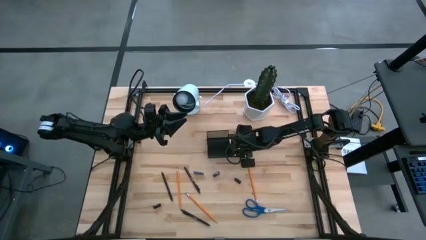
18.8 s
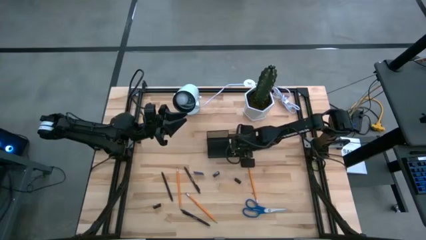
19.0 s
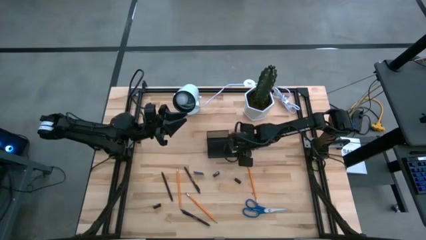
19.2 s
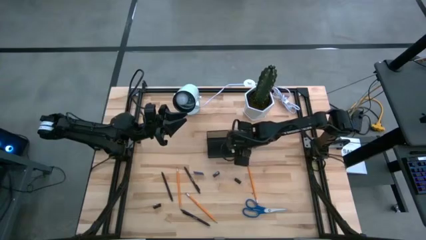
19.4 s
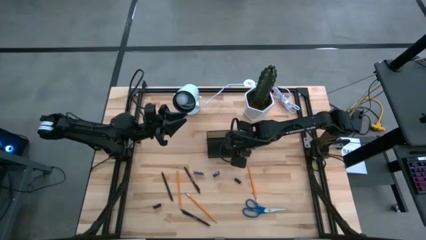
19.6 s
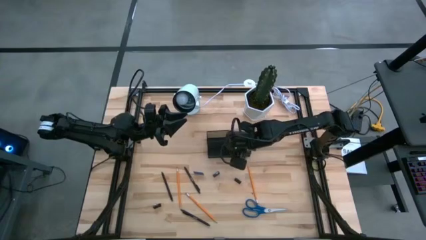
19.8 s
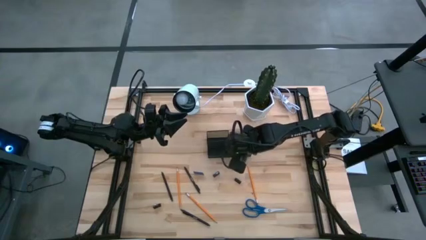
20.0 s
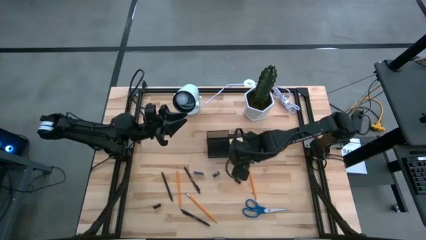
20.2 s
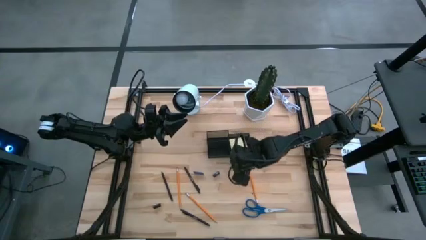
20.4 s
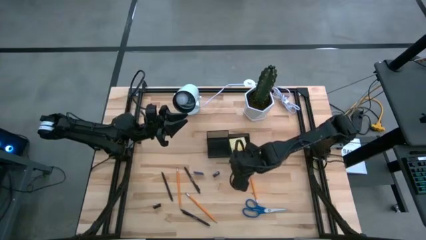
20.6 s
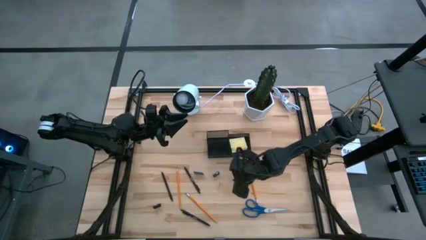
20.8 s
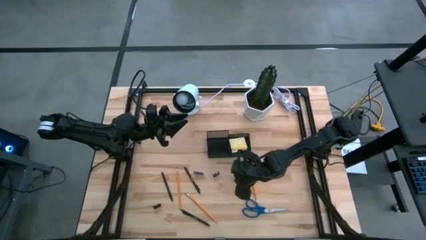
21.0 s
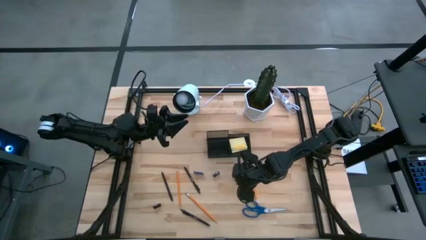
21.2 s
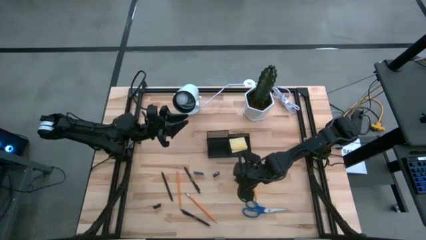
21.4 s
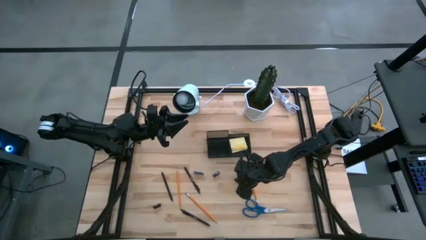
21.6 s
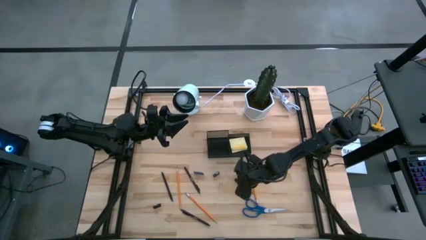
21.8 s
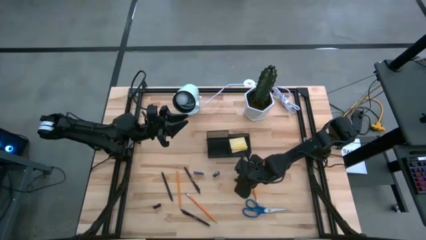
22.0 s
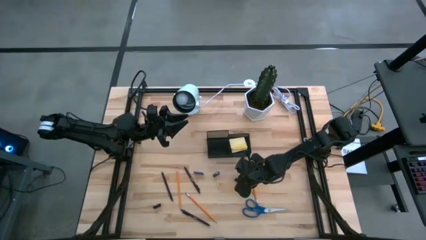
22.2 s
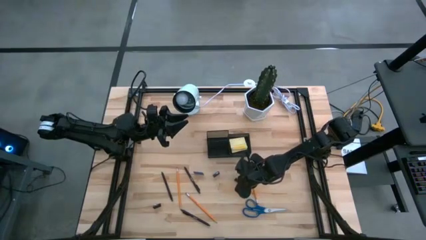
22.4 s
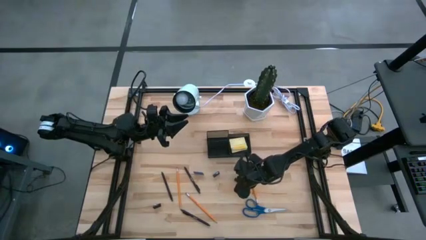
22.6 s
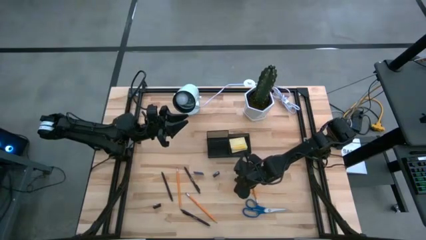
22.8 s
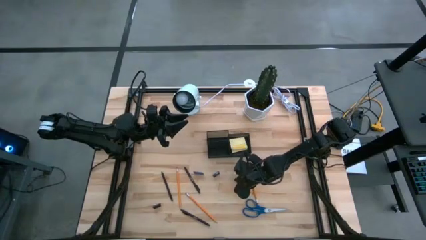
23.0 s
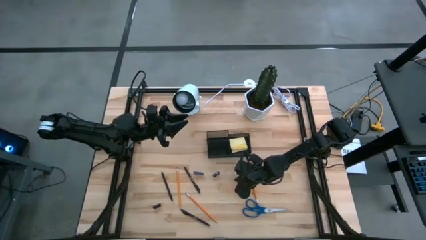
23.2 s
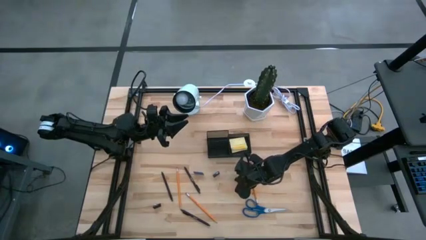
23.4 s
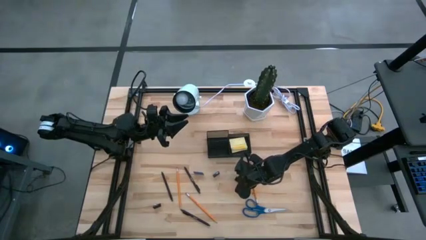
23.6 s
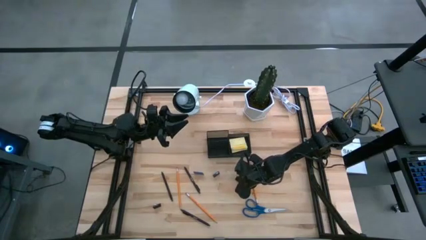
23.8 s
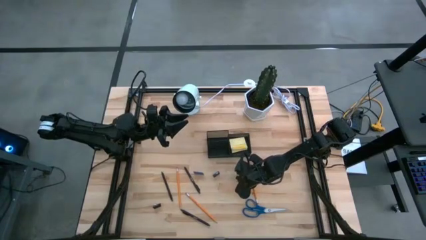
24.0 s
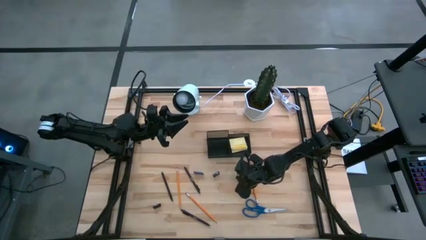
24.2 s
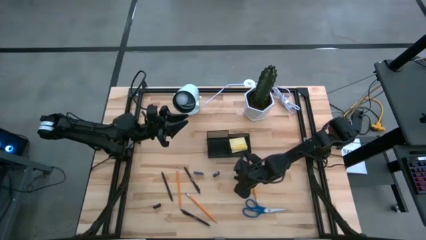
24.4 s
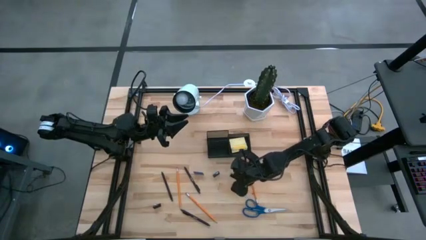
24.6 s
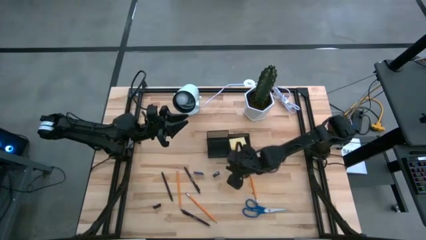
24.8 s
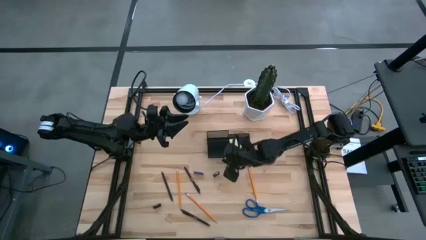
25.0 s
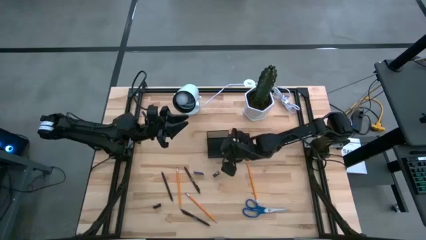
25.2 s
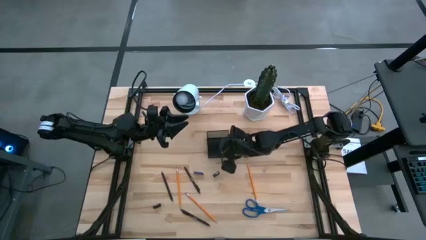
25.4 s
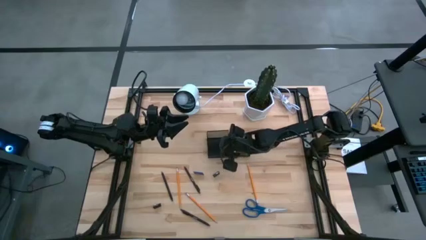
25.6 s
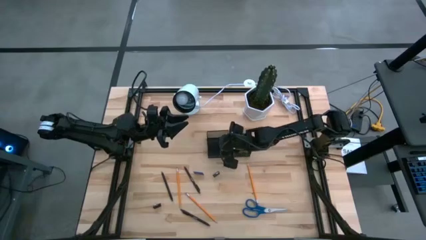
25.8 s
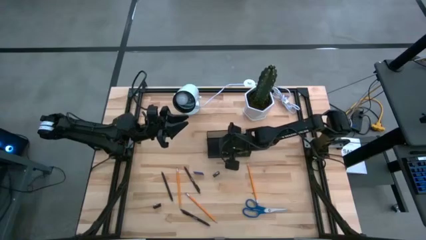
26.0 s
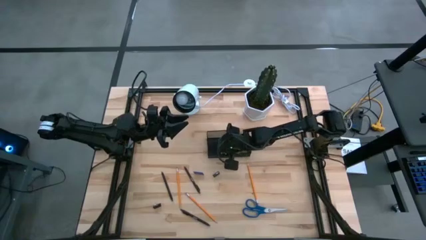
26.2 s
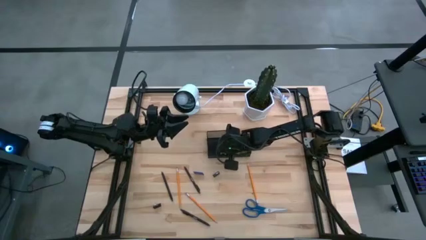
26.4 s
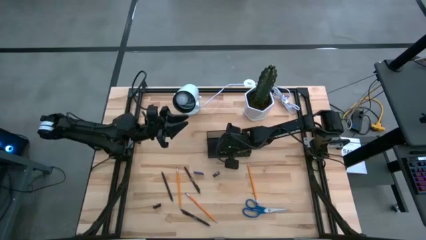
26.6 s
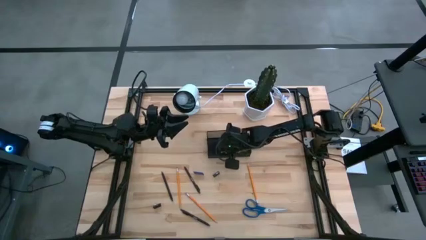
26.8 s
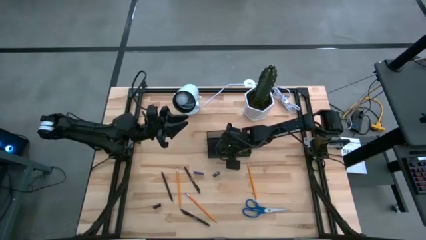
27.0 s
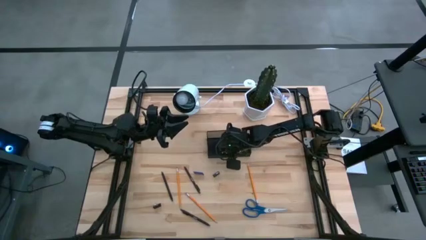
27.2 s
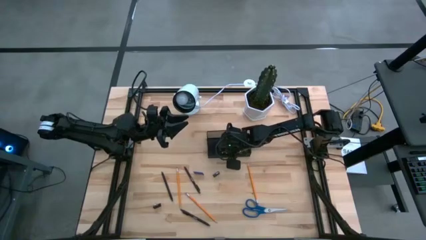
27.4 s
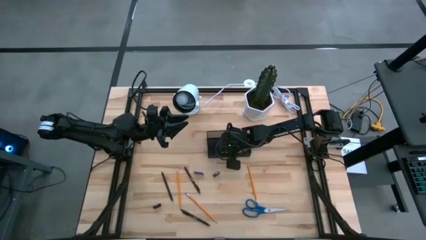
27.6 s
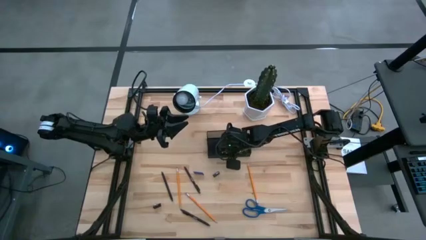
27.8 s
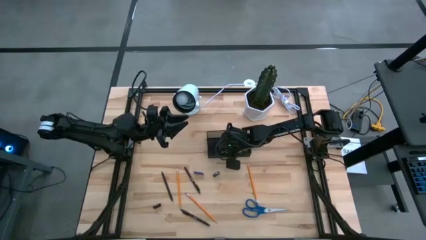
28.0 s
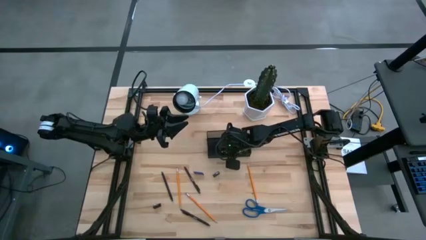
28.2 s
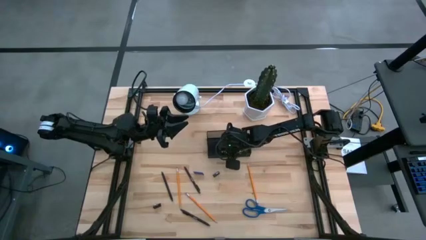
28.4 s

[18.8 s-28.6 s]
Task: Pick and place office supplies into organizer
Put the right black binder clip into the black desk organizer
